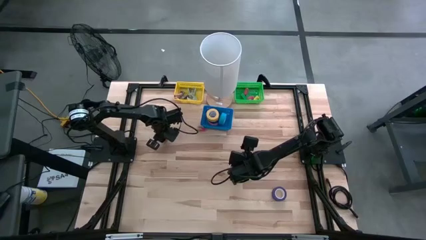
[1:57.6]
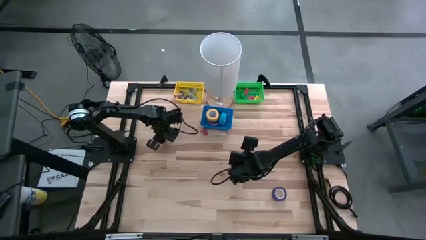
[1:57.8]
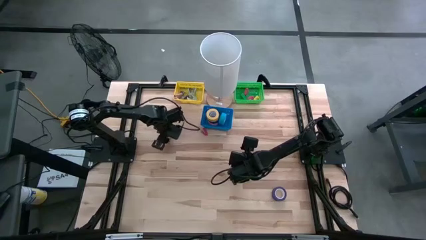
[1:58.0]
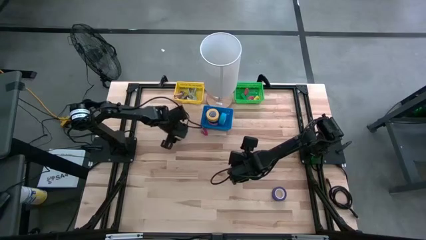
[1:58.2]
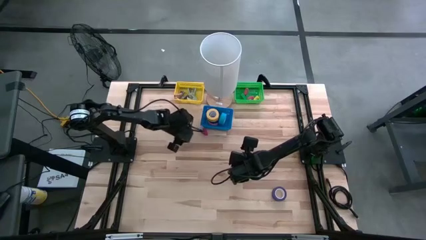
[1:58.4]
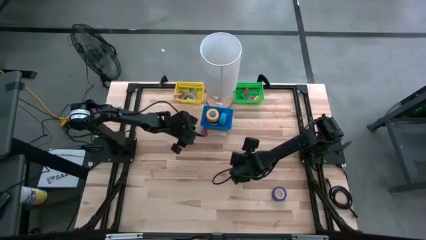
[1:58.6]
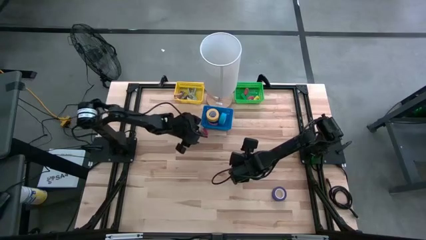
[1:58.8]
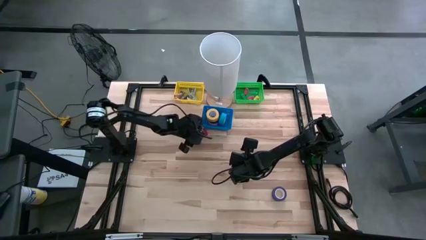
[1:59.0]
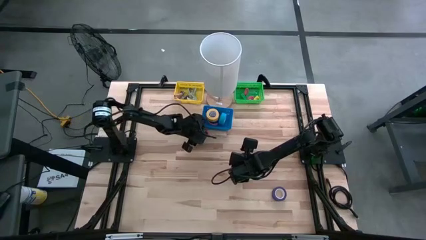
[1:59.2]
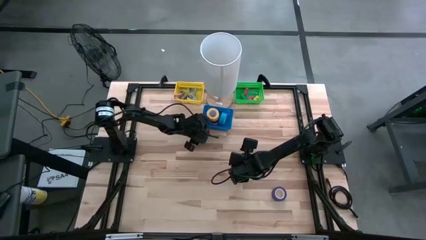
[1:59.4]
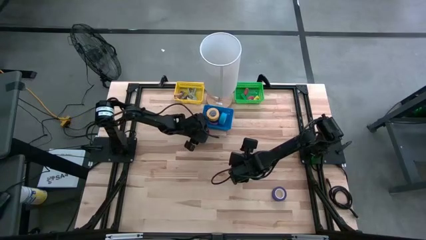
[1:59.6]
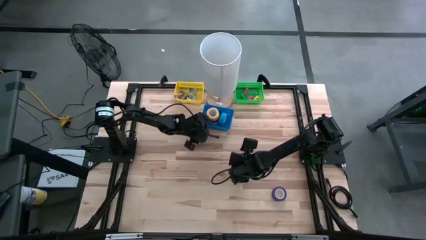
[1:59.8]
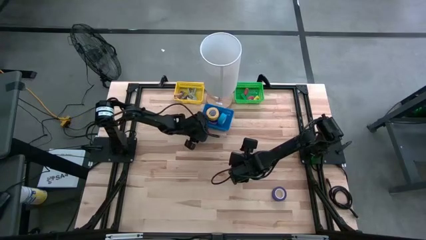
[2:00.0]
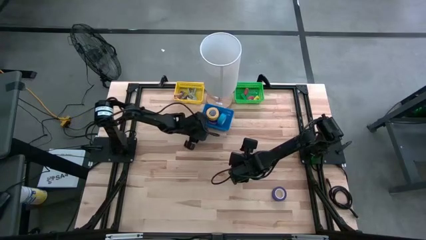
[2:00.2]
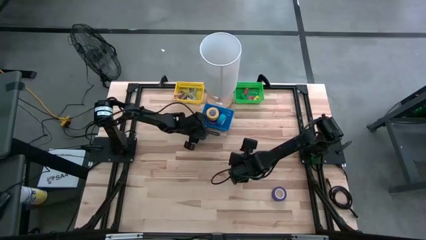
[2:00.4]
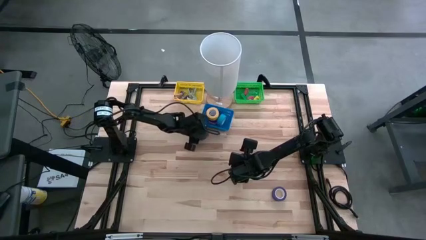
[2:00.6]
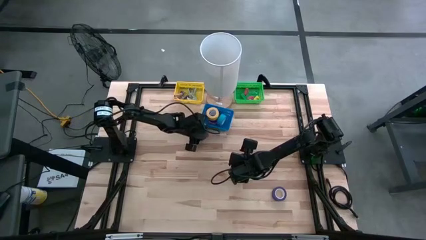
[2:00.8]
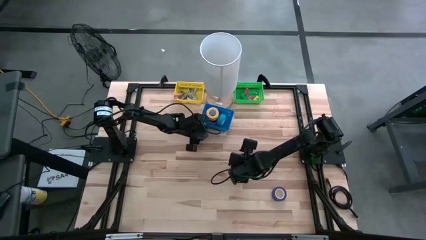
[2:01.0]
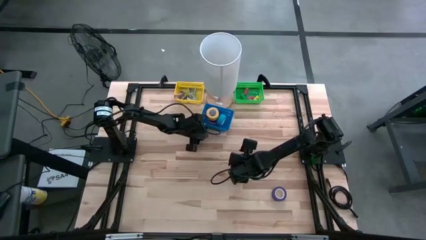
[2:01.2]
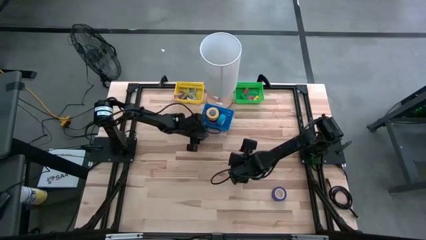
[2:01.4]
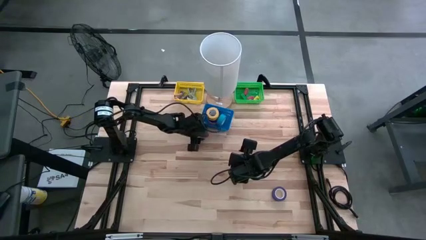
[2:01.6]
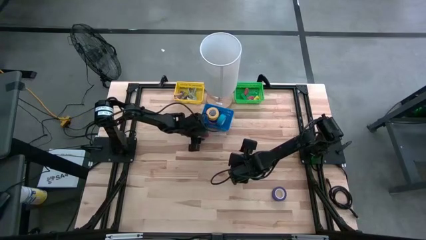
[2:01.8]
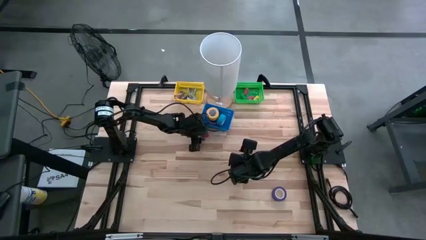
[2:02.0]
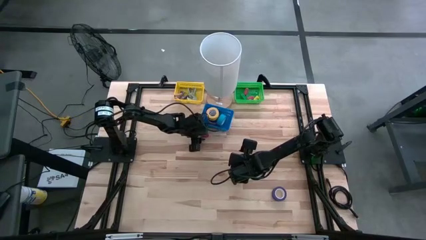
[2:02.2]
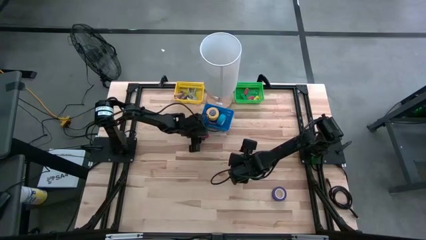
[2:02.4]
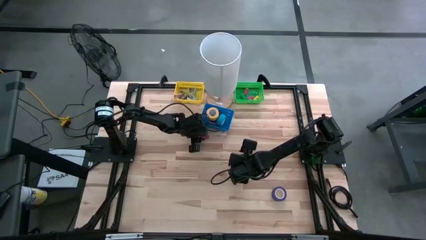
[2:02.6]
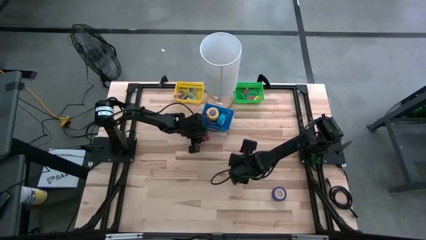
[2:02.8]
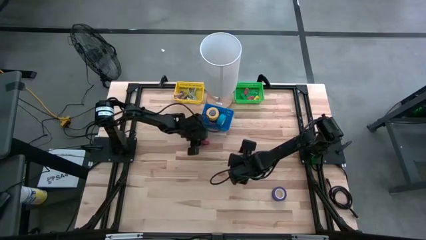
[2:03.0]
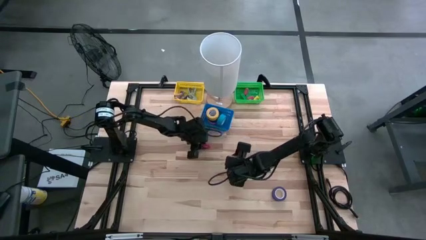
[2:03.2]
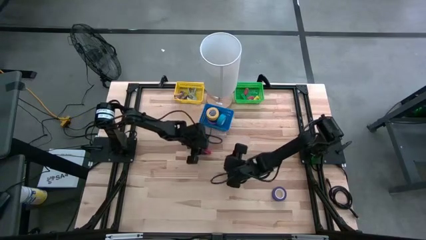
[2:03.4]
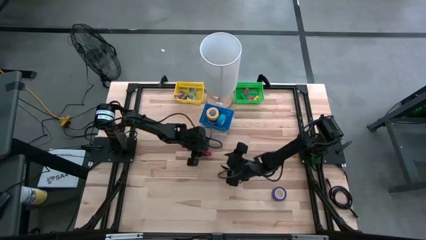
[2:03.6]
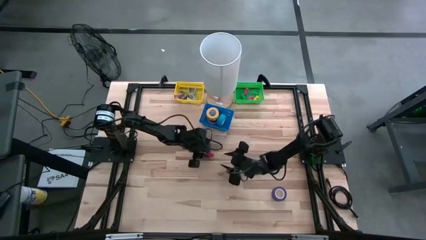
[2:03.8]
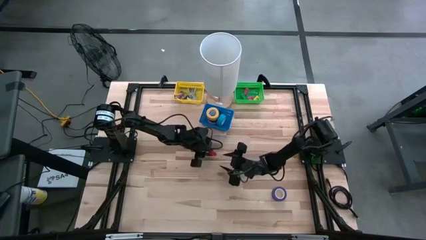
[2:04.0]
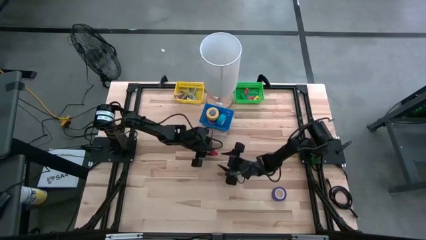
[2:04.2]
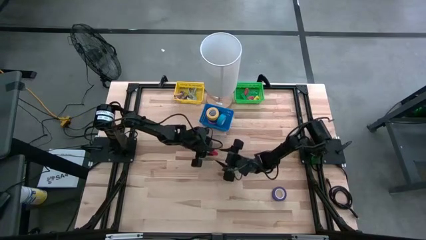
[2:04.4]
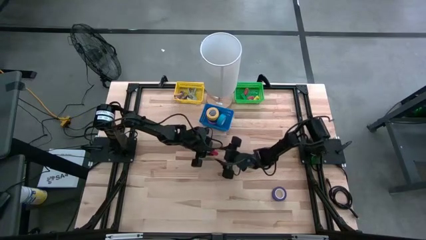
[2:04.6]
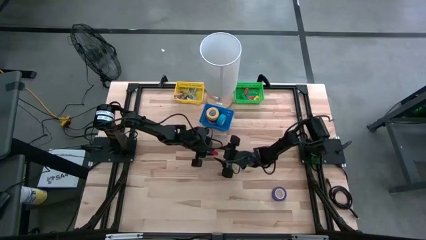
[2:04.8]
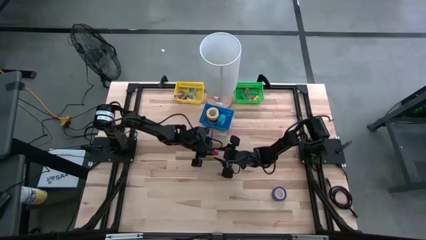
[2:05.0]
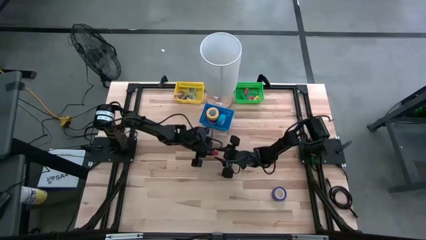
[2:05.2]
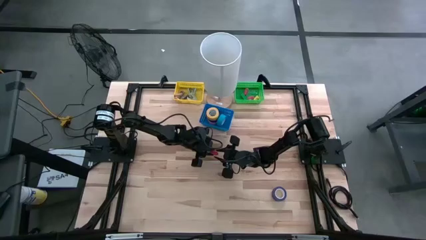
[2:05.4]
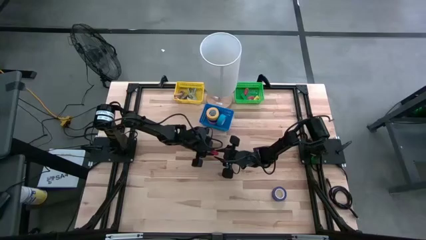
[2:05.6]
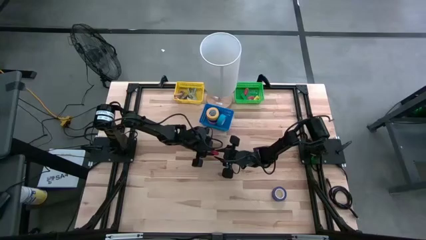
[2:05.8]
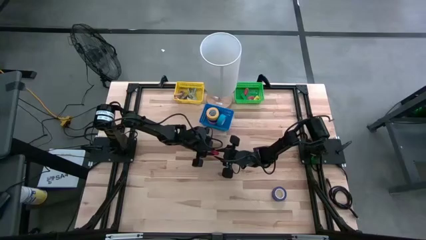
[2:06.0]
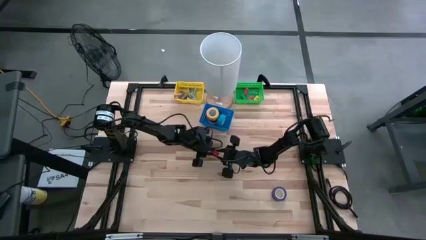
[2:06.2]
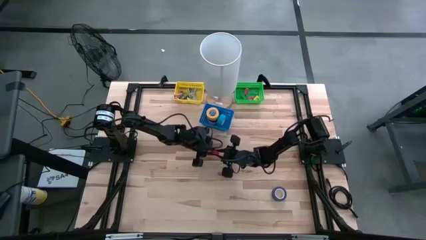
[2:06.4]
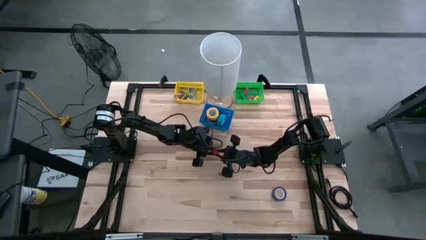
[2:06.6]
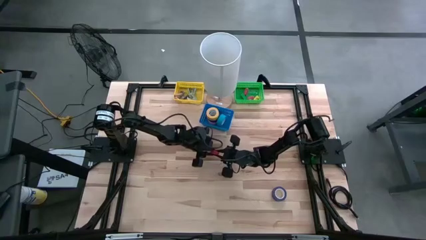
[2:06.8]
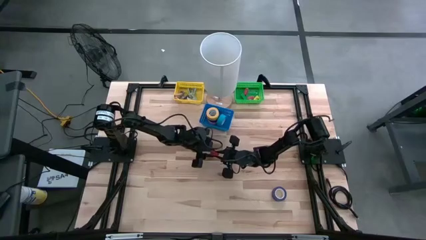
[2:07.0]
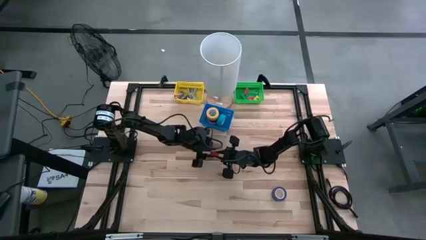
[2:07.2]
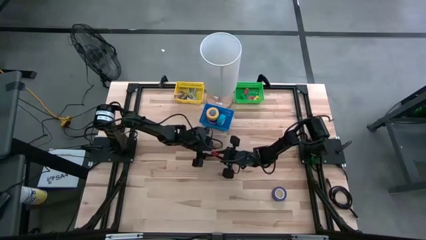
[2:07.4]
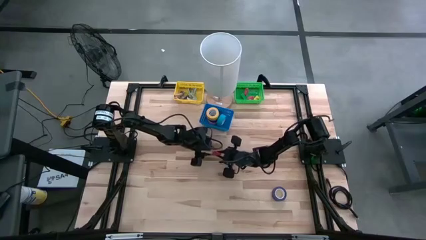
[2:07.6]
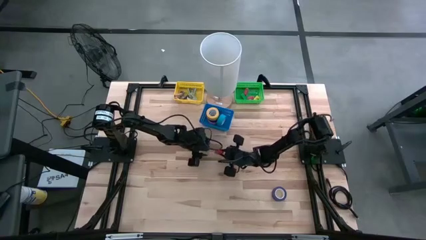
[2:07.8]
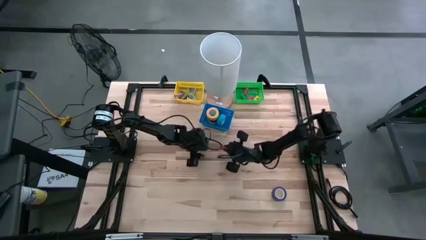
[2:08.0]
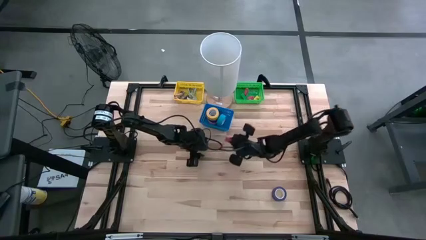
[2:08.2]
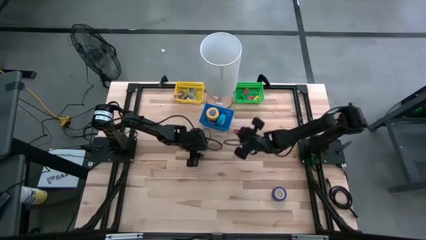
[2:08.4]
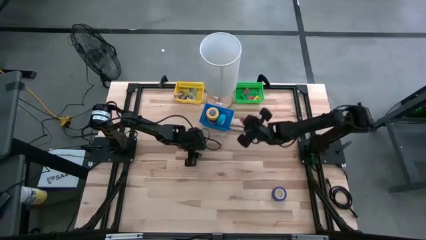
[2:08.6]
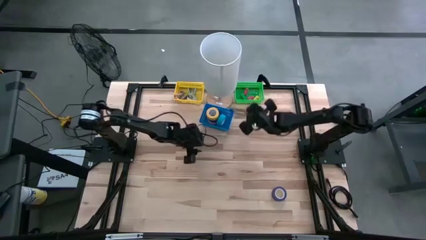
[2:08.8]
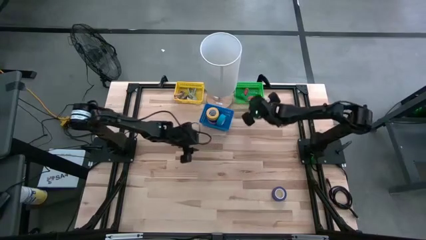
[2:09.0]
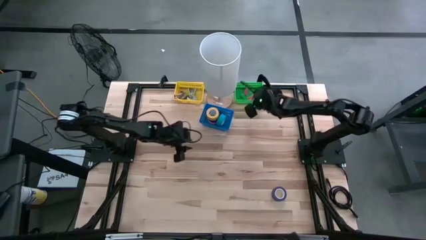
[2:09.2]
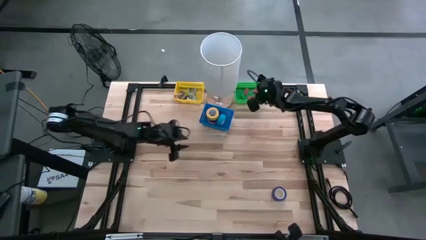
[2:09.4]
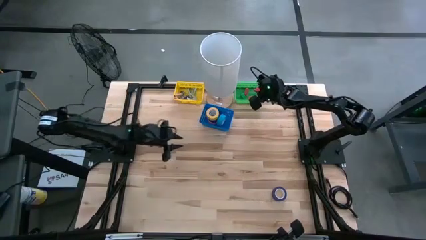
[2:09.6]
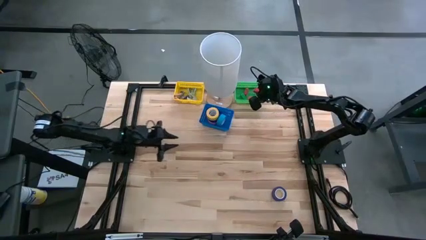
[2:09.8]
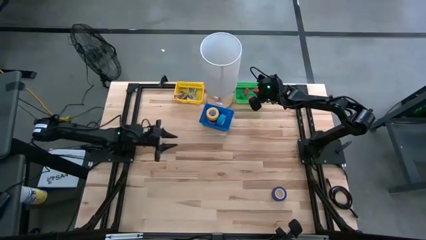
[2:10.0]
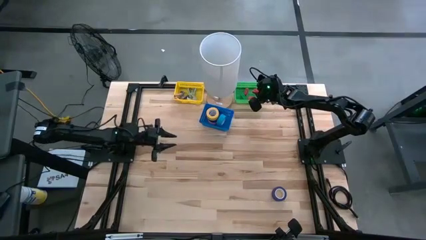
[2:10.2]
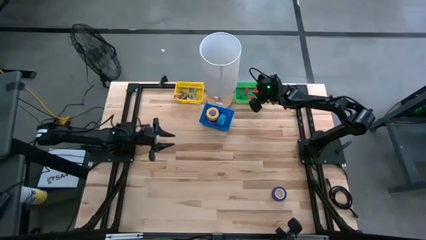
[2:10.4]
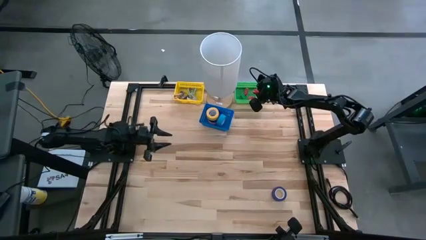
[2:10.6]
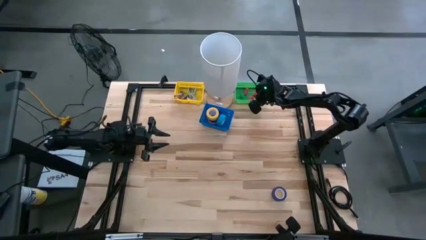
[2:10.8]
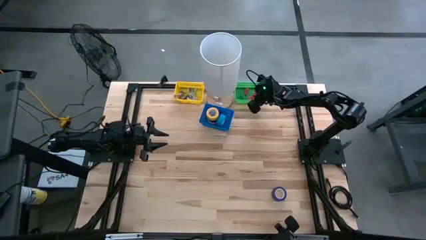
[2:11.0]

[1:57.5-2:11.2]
Task: Pick and place Stapler, Stapler remover, tape
Put the red stapler into the green basket

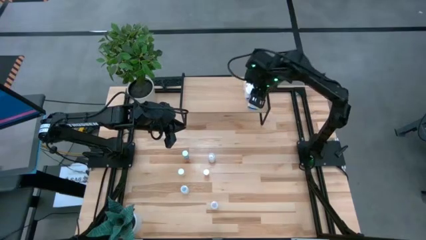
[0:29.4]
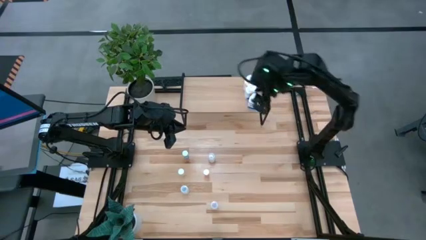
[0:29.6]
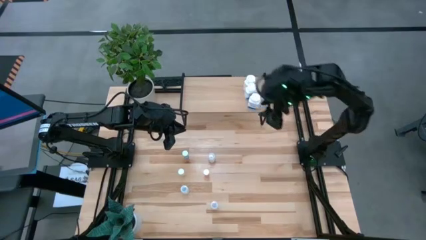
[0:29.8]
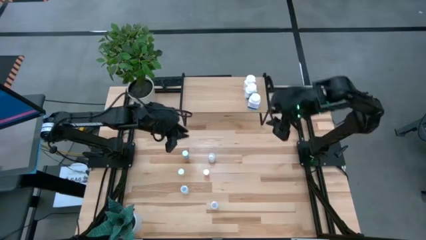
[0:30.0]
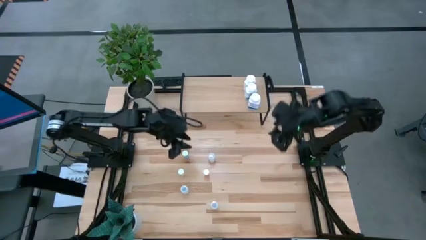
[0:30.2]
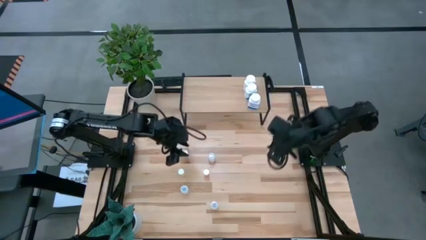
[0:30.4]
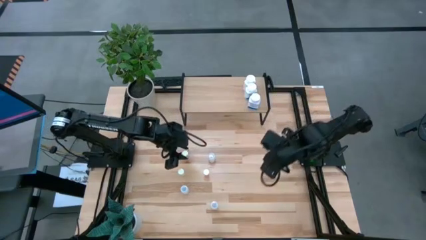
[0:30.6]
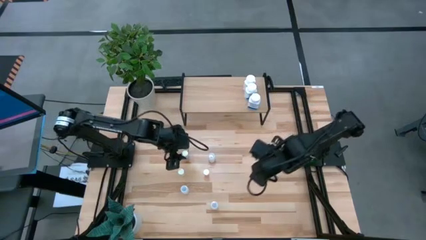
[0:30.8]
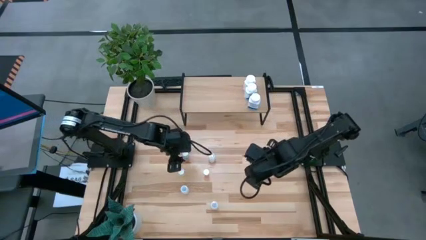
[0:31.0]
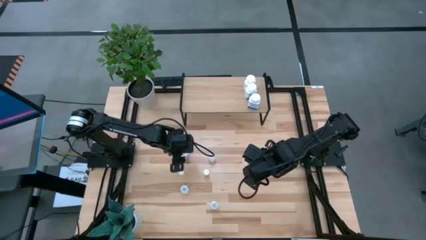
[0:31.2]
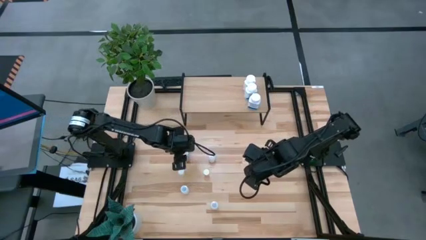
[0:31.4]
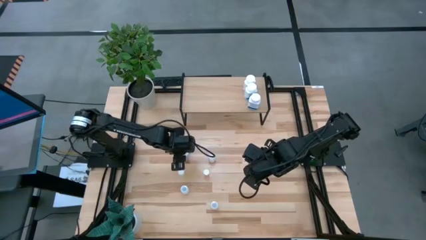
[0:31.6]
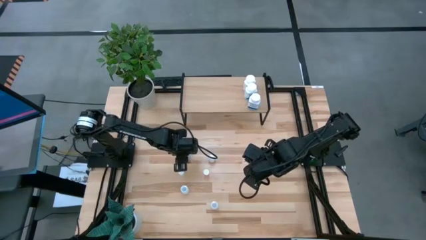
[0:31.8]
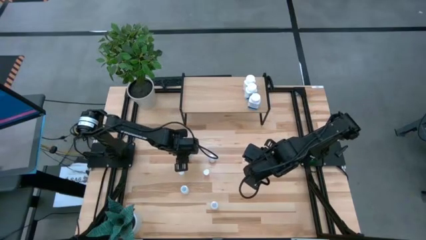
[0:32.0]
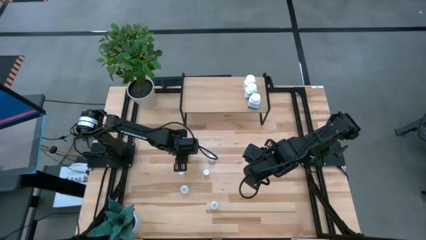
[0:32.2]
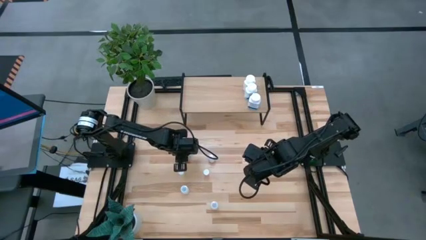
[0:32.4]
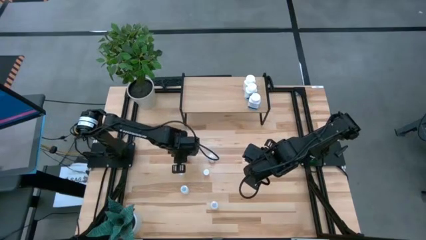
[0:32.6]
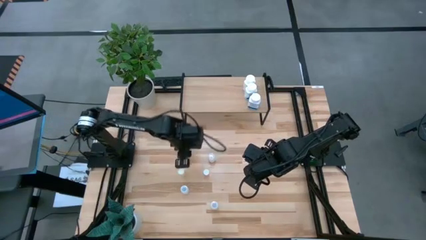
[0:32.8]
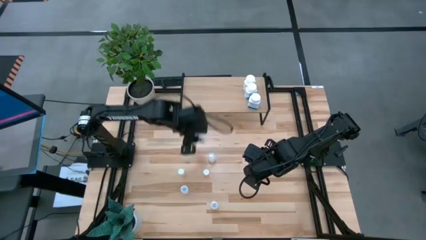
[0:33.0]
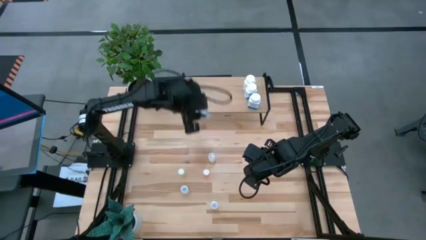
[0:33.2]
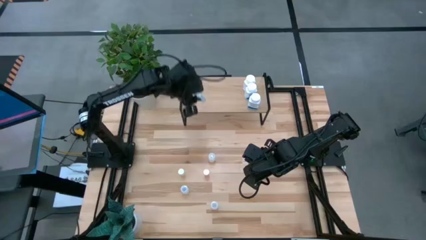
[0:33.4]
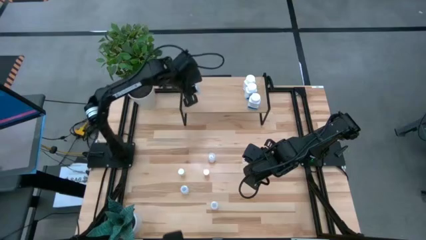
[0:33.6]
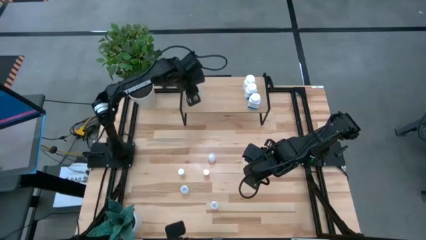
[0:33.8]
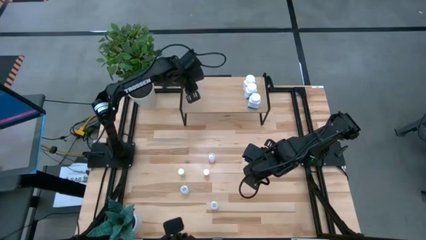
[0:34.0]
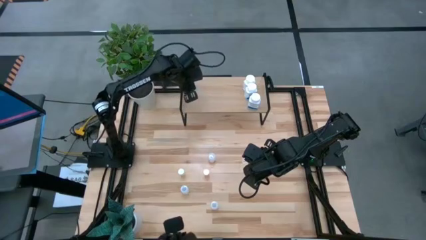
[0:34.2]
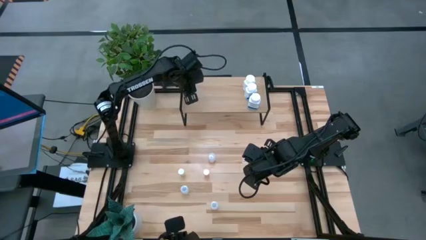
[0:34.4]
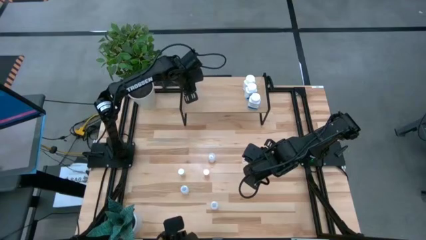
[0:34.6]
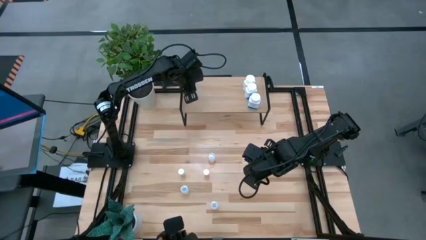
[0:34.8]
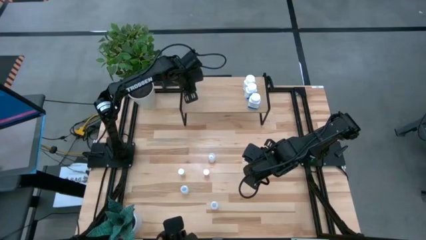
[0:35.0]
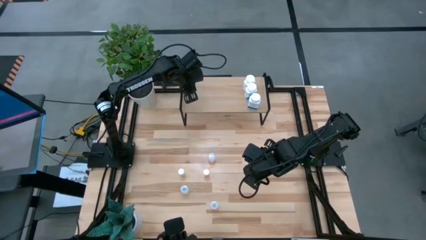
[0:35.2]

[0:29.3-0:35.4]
Task: Pick and place medicine bottles onto shelf by color
Put the blue pill bottle on the shelf
